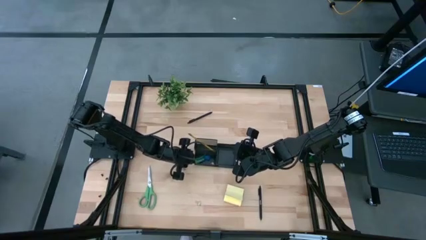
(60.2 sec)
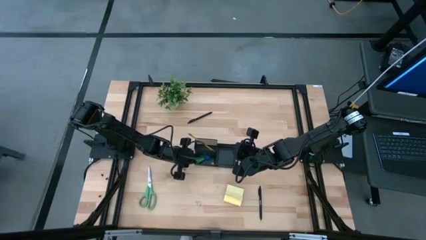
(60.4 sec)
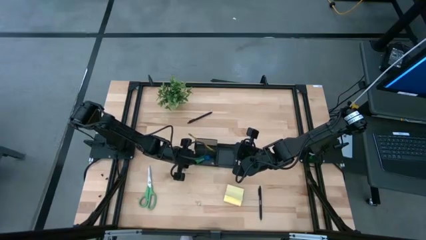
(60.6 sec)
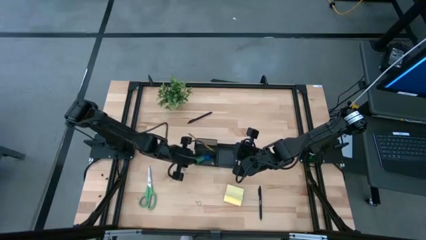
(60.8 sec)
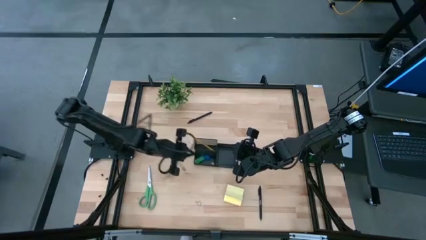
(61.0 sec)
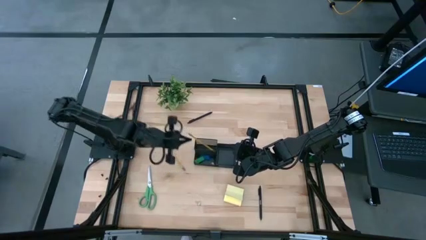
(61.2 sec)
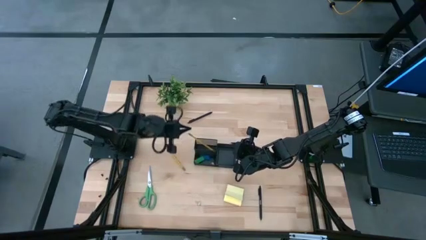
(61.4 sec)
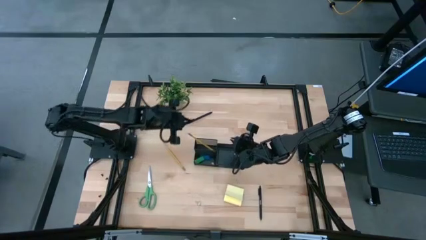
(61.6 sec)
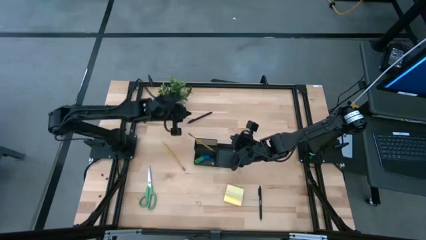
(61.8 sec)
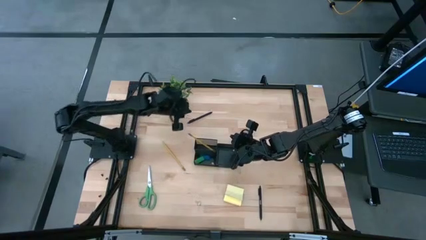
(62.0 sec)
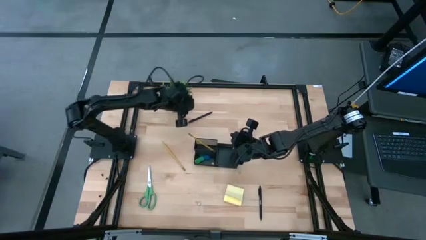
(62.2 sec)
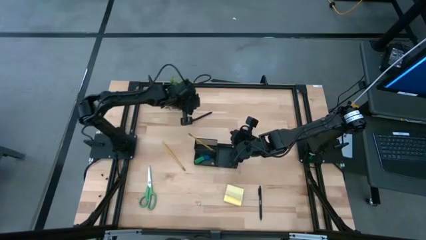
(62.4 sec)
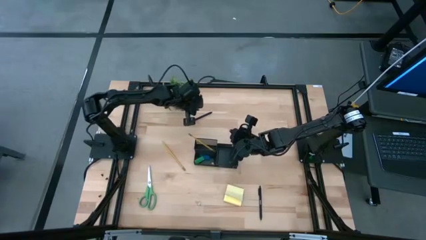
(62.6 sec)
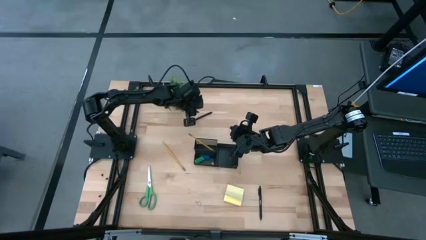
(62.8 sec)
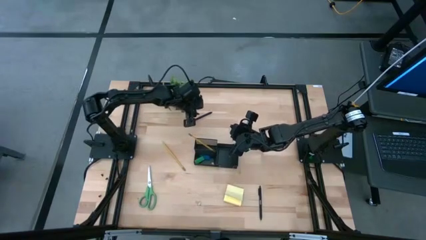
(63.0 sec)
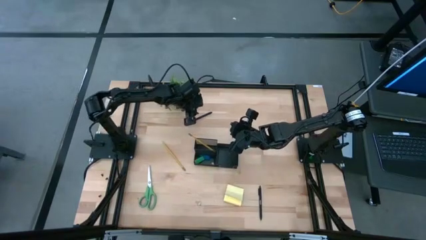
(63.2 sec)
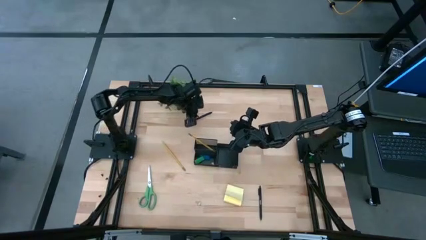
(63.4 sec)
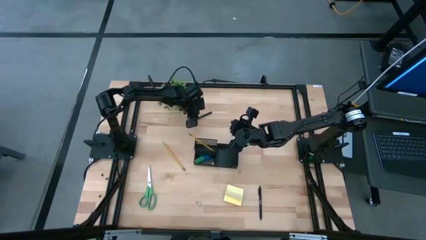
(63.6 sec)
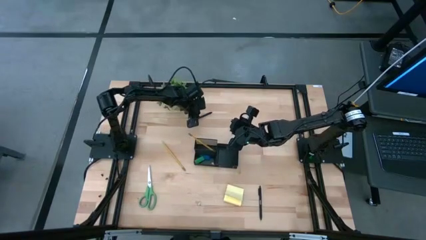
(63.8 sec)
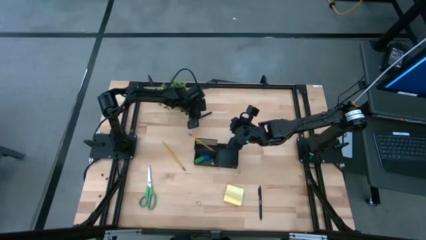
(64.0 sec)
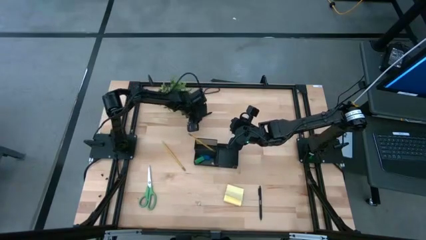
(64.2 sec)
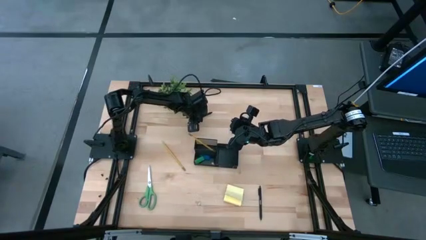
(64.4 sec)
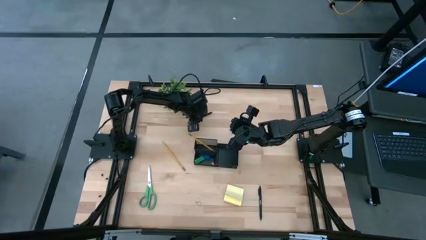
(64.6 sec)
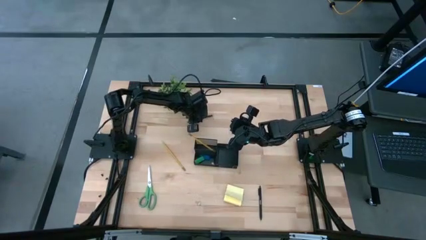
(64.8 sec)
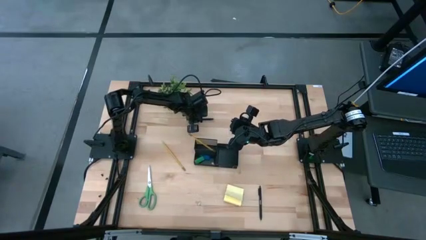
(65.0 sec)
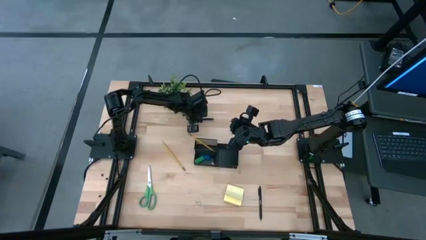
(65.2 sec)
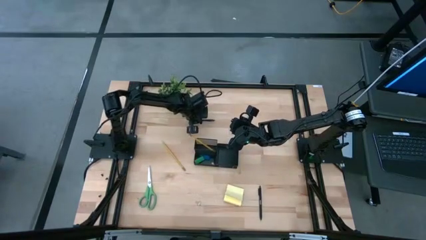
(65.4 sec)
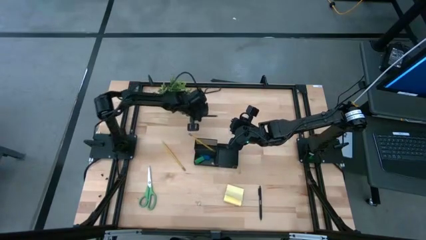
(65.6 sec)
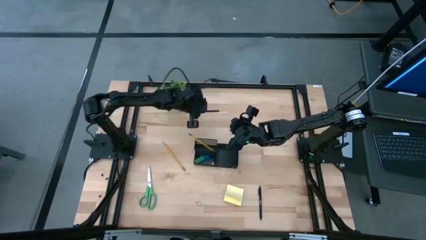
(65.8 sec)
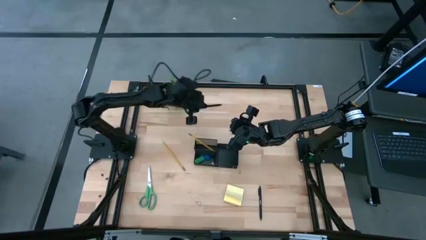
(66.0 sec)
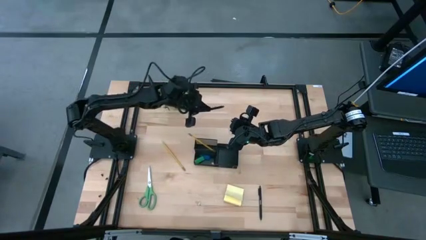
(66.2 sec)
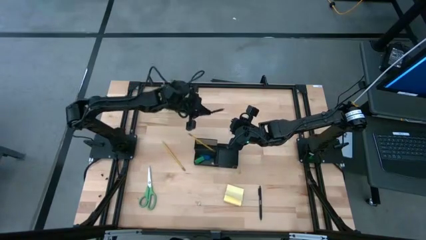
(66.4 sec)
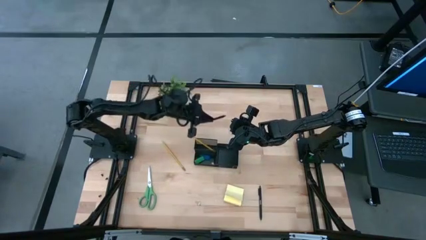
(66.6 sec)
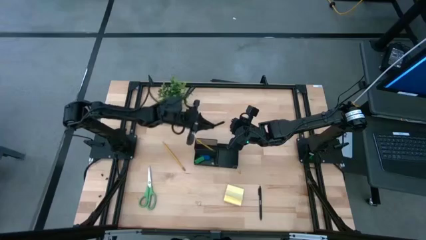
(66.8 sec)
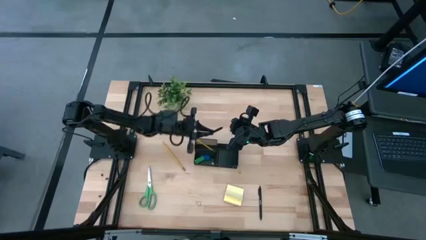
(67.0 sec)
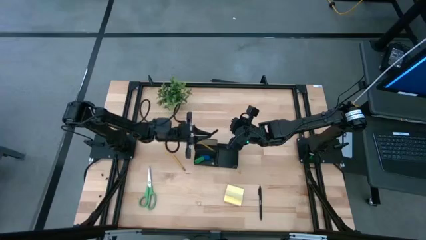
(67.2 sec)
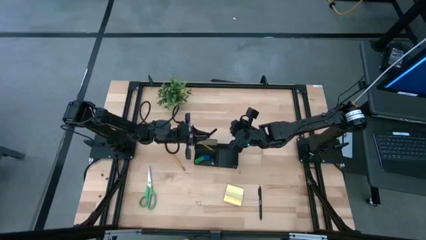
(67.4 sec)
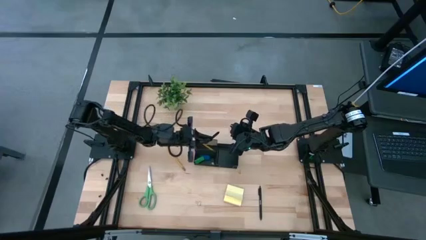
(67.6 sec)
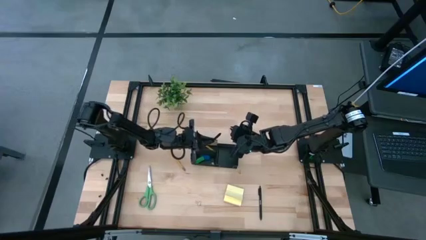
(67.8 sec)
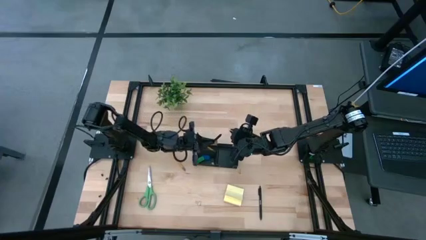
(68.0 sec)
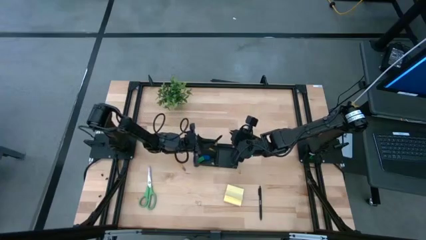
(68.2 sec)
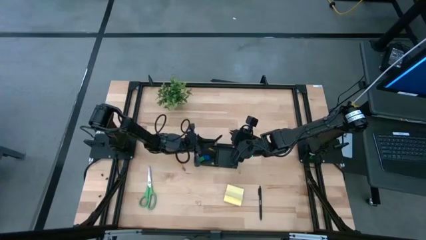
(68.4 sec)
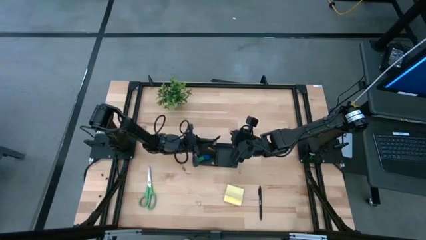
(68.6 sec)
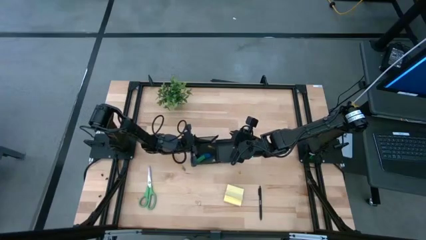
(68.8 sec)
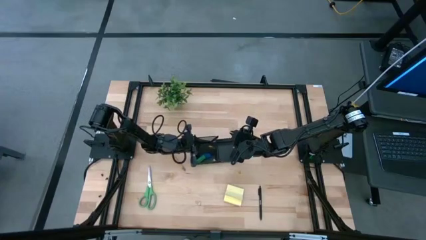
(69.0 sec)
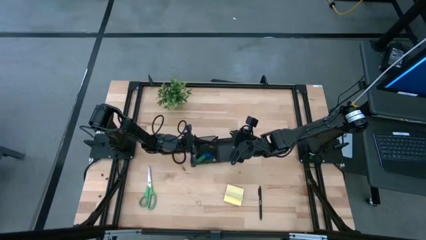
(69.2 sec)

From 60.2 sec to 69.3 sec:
Task: Pick and place office supplies into organizer
Put the top black pen into the black desk organizer

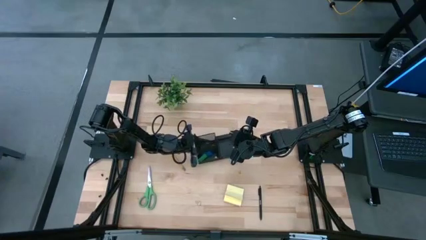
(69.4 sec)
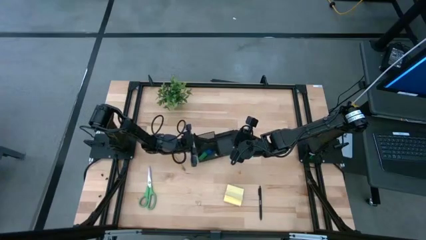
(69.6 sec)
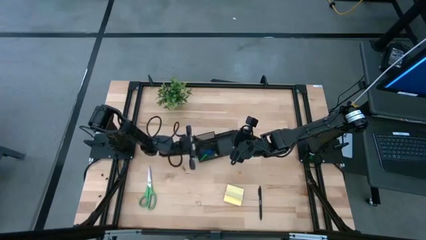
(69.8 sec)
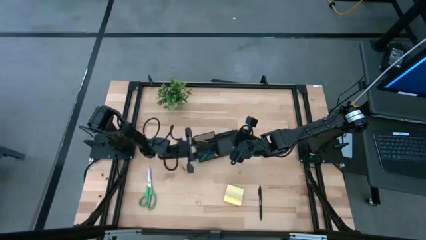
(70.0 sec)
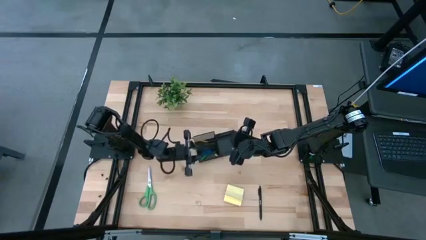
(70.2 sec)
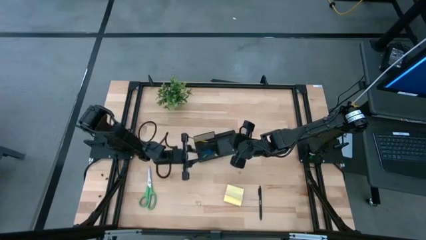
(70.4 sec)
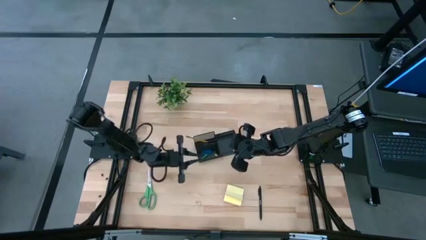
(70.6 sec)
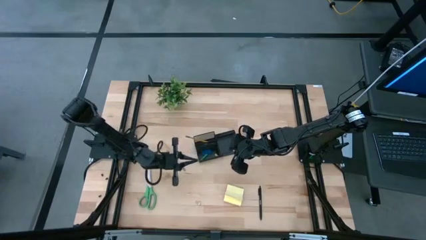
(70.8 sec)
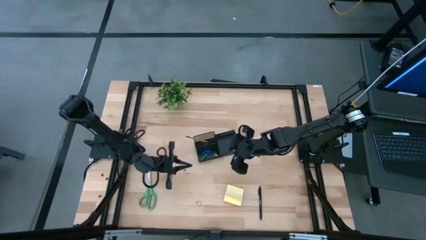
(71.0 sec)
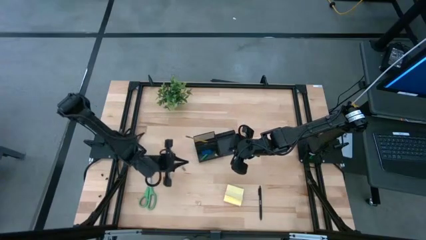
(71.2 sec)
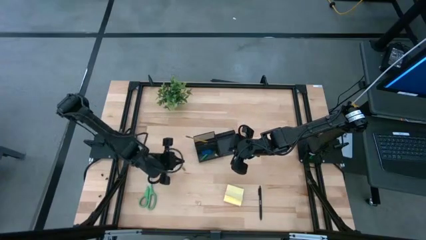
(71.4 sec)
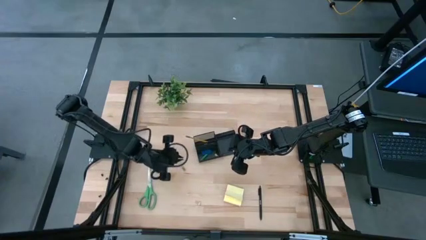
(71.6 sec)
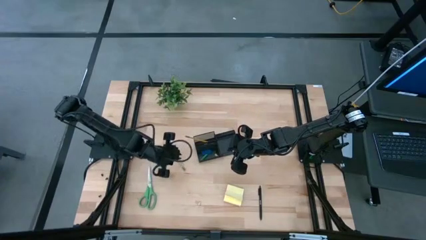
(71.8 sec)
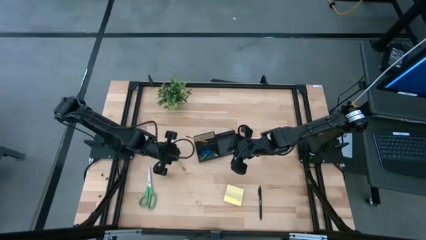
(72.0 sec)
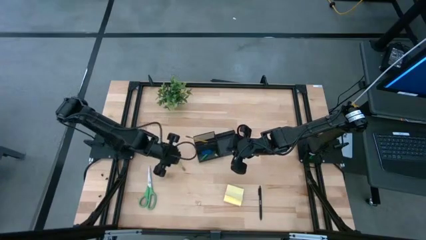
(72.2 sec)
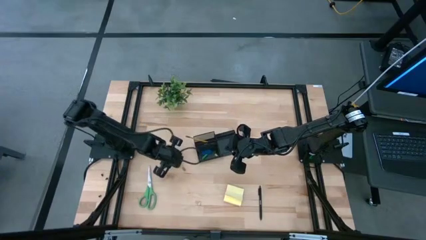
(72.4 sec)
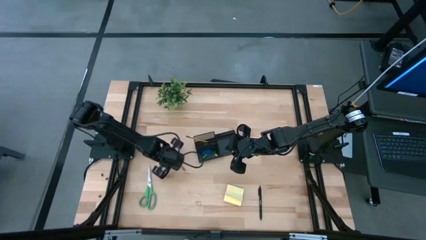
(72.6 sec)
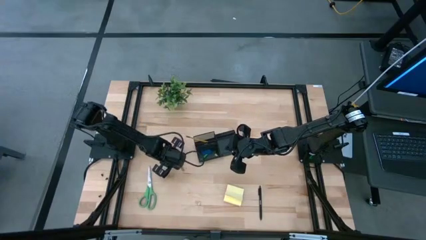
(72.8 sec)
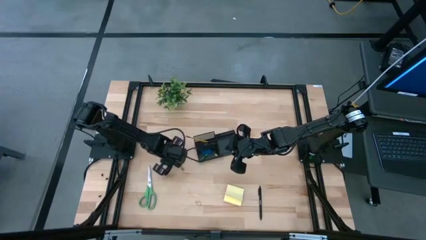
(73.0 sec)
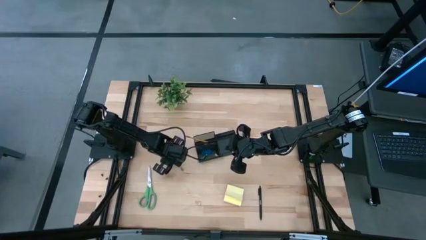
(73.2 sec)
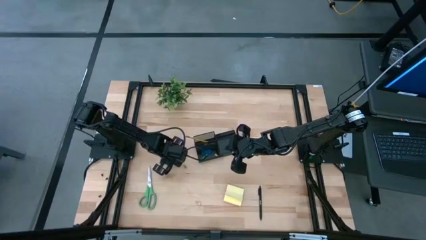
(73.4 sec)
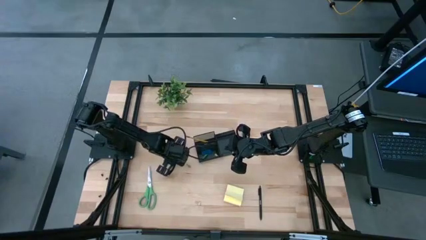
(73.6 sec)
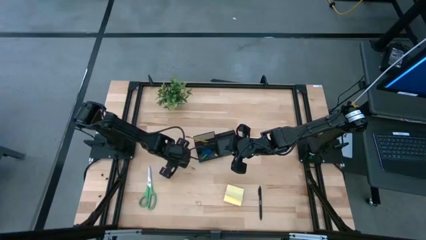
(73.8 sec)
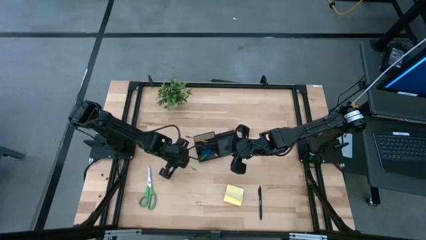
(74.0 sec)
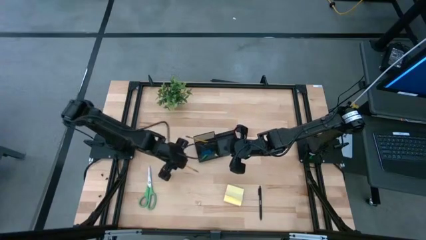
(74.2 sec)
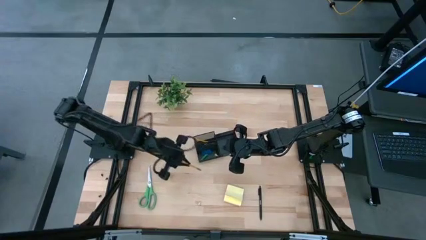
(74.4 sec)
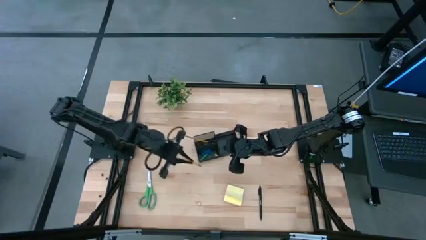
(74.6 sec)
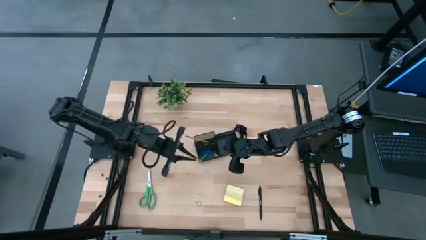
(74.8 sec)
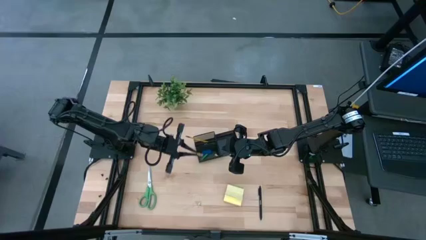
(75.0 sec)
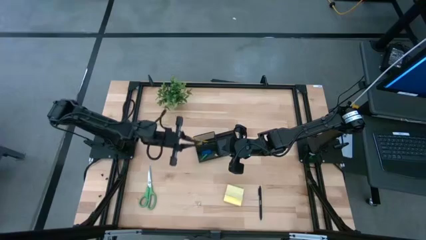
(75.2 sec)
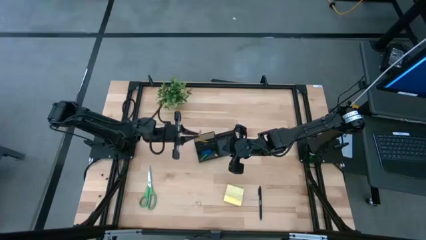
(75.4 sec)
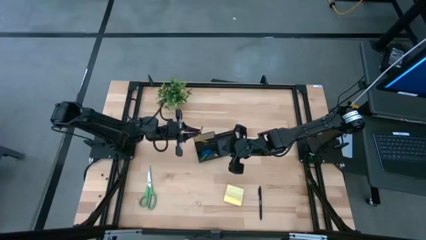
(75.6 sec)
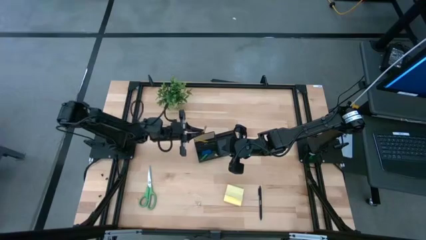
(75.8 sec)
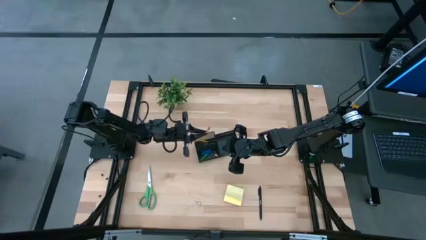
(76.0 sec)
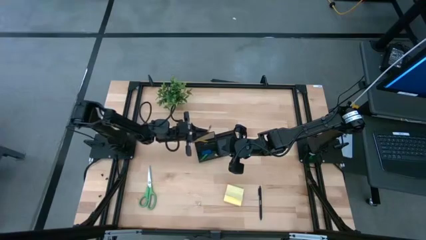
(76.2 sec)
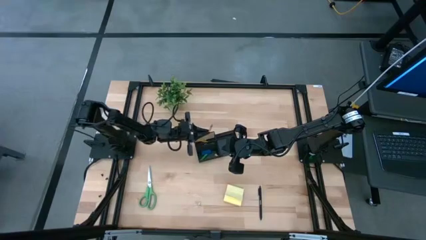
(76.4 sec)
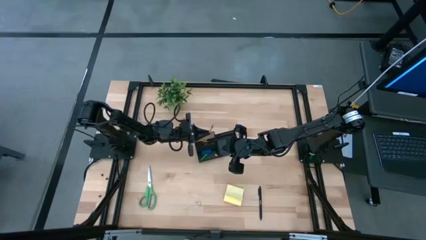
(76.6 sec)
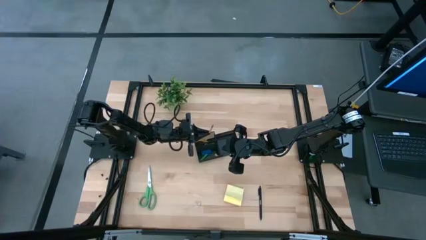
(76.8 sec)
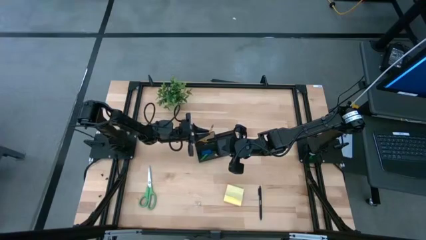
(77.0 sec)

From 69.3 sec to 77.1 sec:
Put the yellow pencil into the black desk organizer
